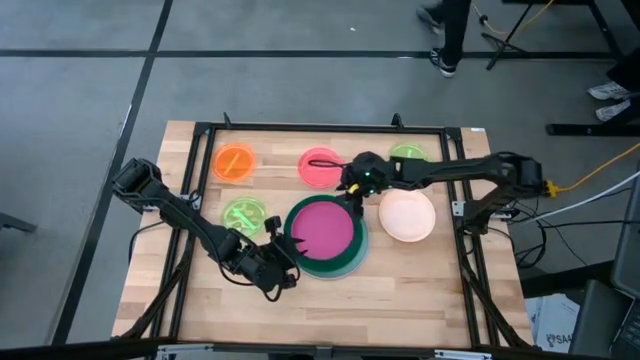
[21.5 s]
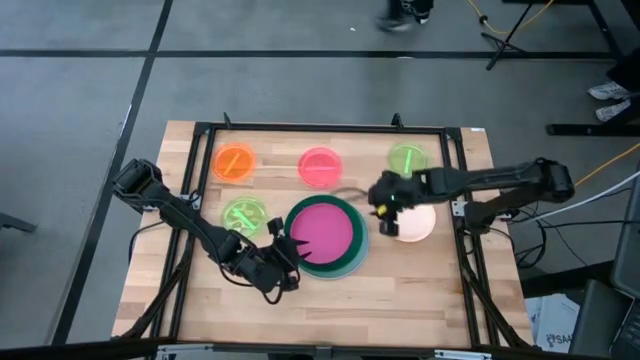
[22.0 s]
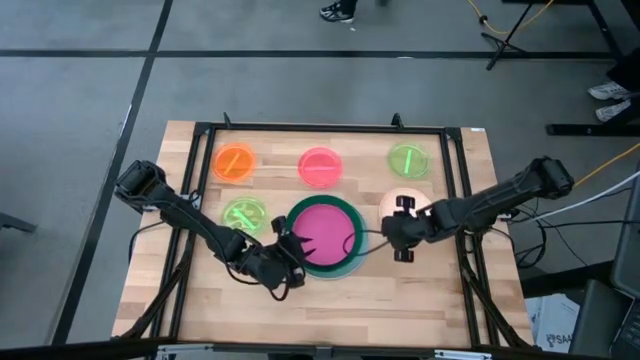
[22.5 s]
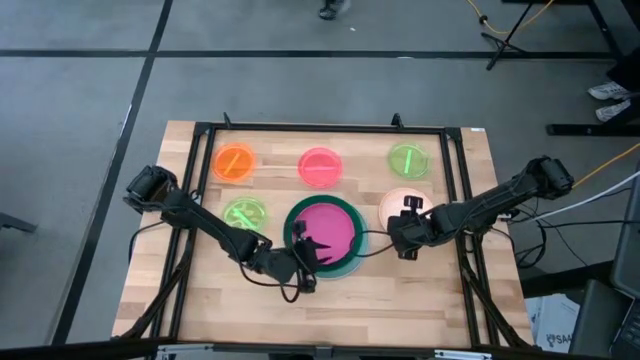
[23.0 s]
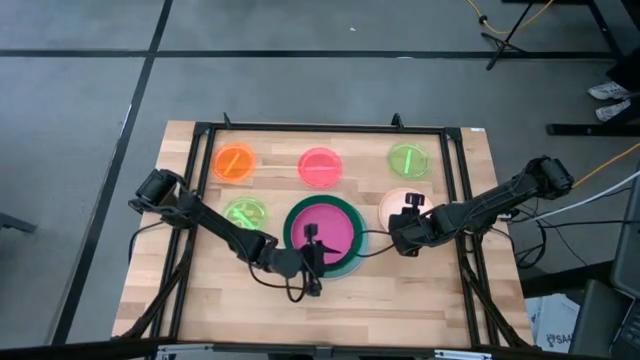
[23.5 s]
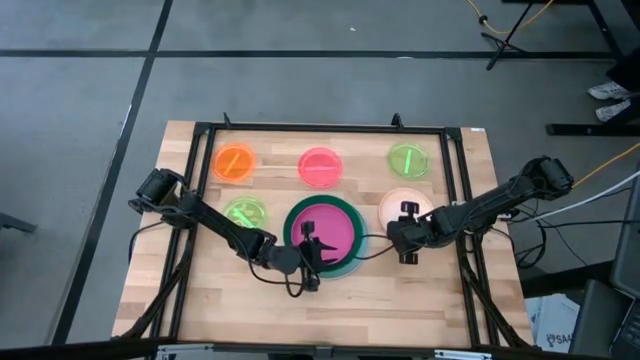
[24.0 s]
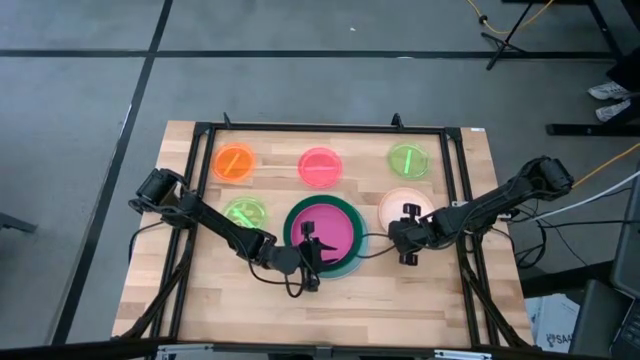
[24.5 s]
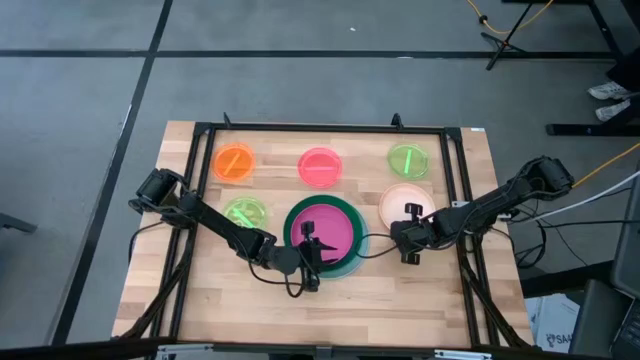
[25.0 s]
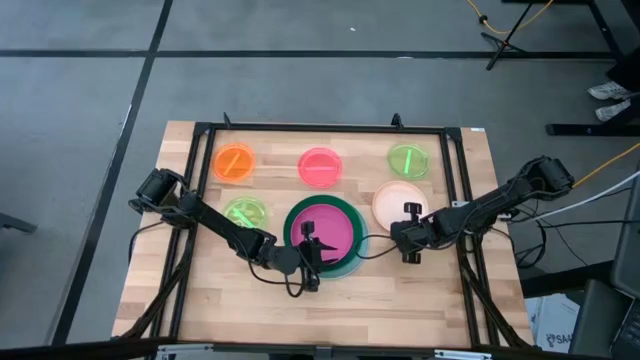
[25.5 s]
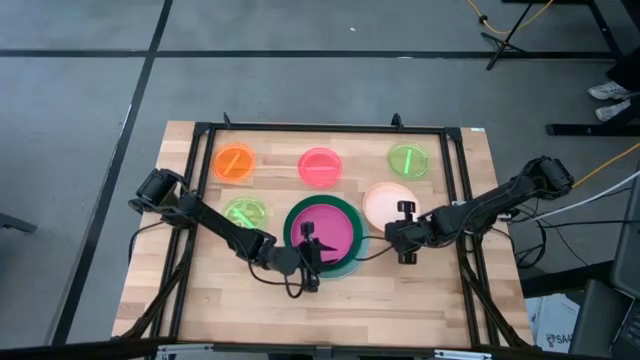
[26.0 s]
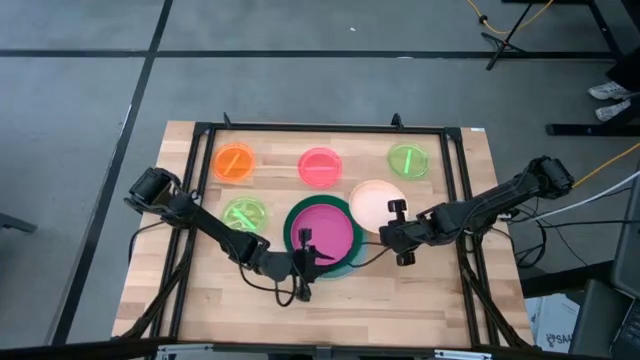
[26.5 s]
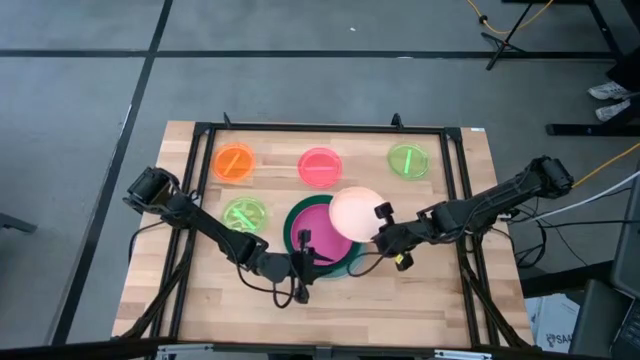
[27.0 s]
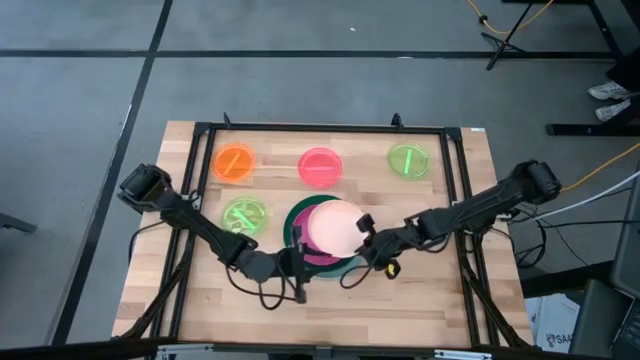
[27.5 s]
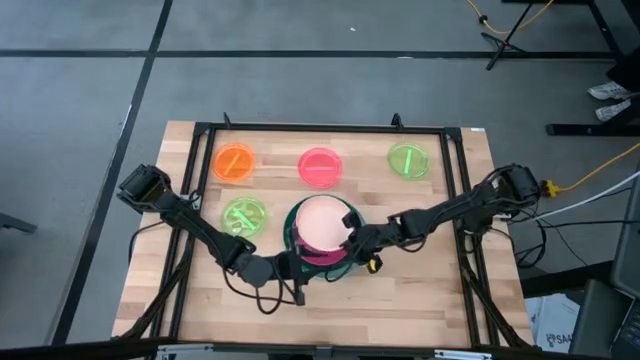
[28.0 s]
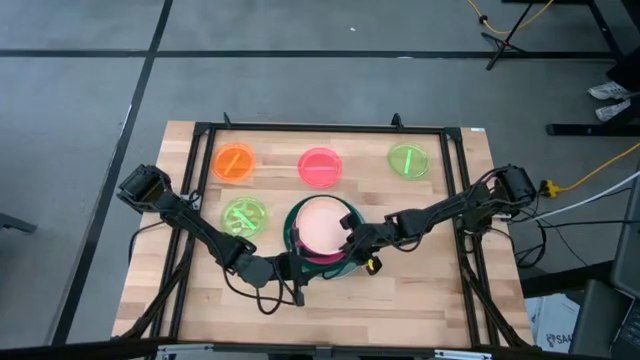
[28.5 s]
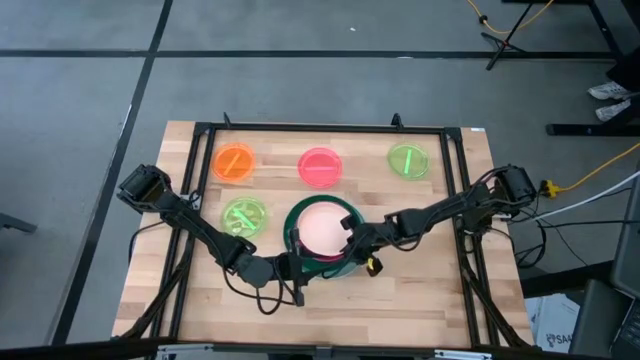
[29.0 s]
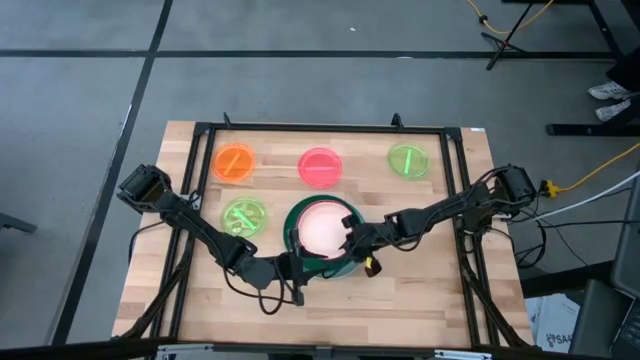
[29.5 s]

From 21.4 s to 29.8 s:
Task: Stack plastic plates
Stack the light orange plate on top of the pink plate

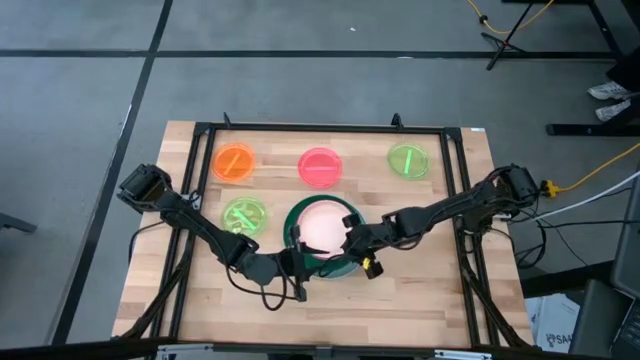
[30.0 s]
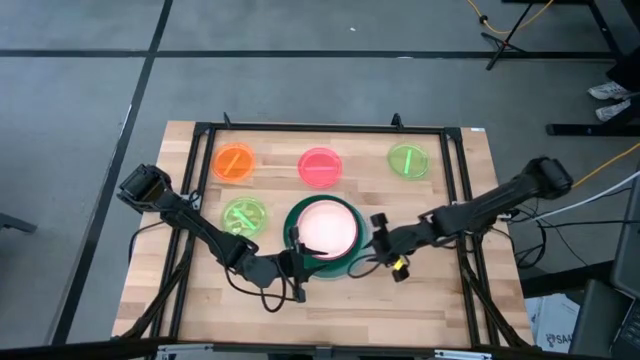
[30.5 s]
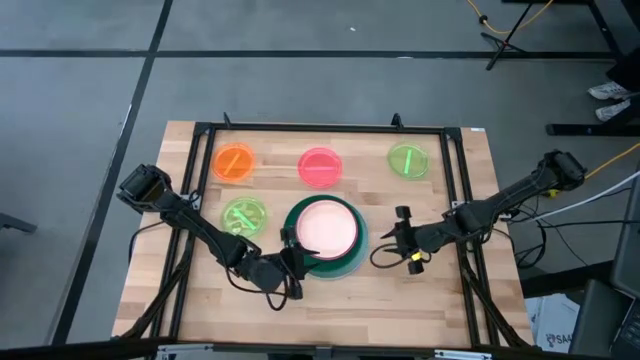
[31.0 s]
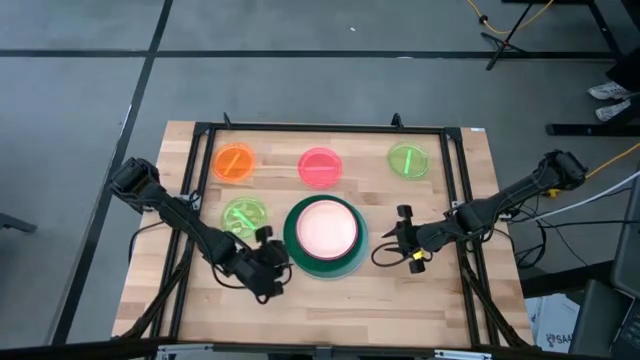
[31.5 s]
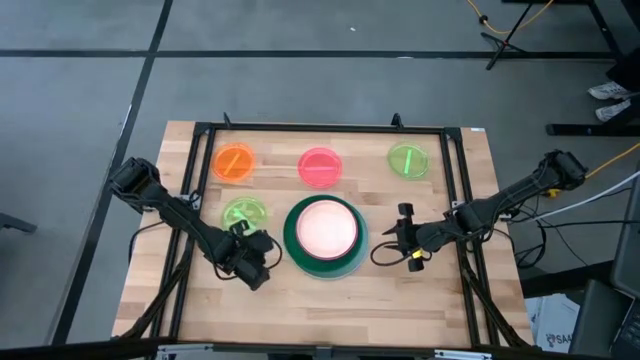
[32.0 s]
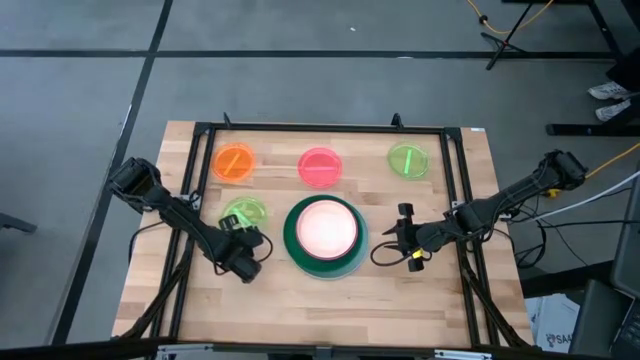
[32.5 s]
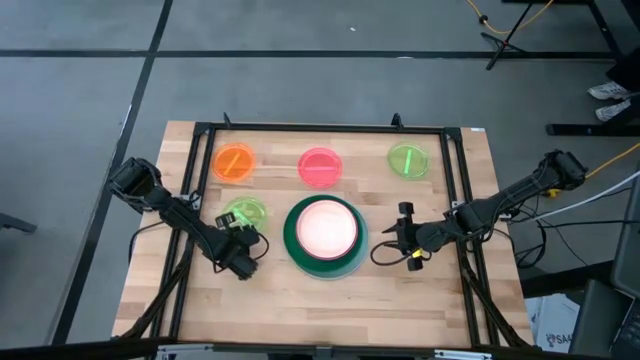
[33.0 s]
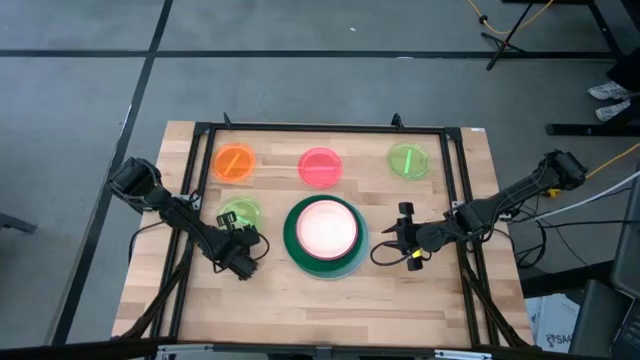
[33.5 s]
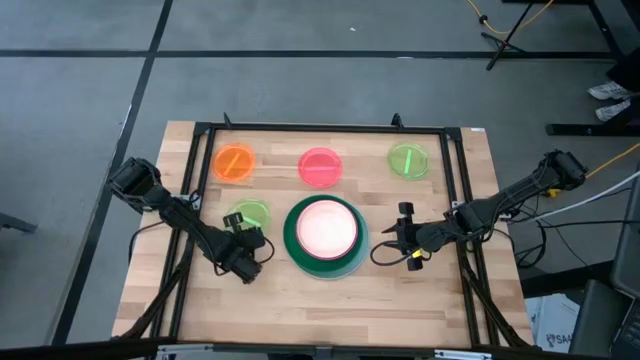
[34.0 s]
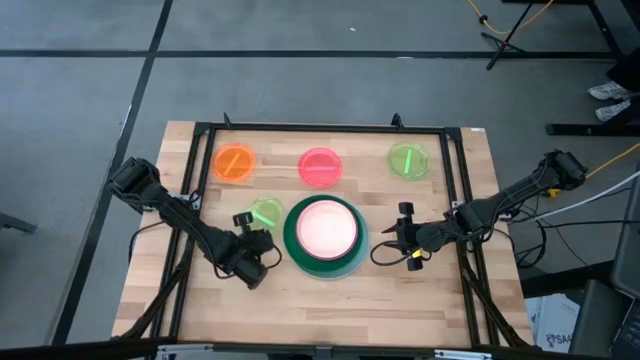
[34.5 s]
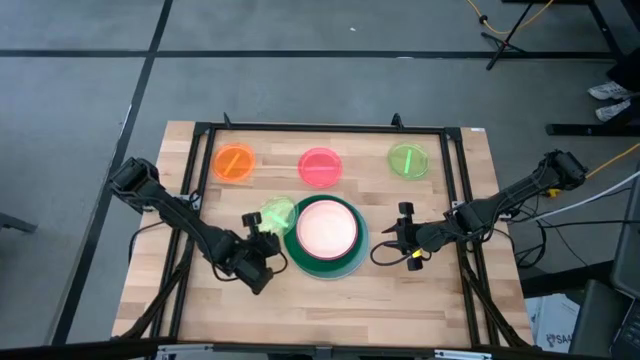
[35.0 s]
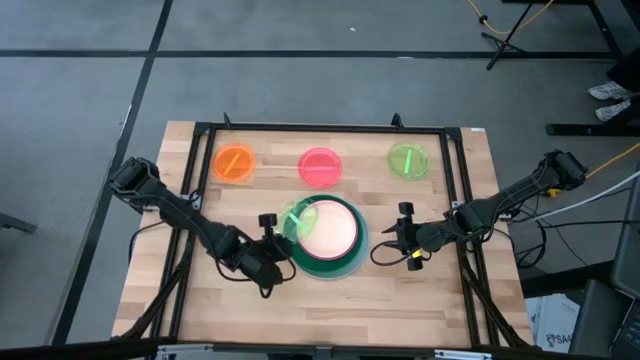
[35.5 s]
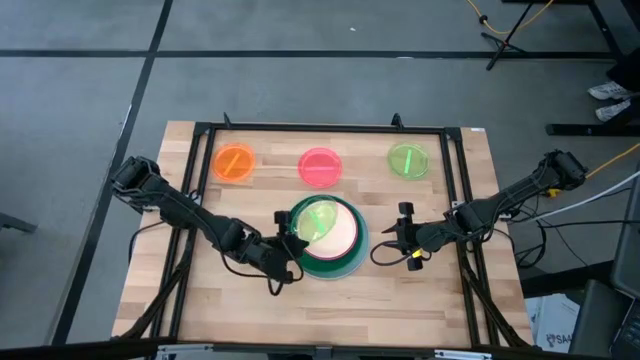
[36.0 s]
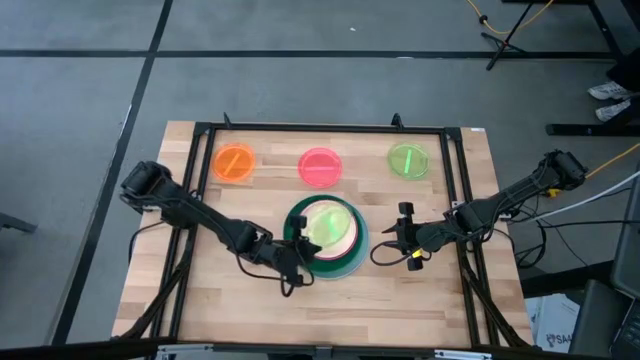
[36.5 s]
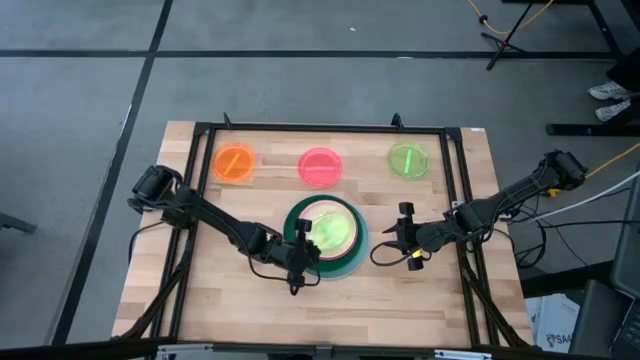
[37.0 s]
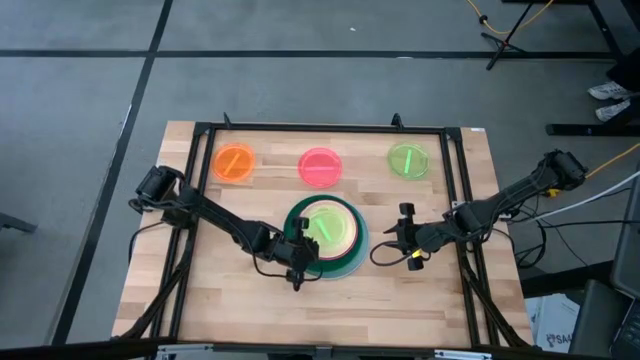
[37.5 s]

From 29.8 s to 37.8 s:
Stack the left transparent green plate on top of the light orange plate

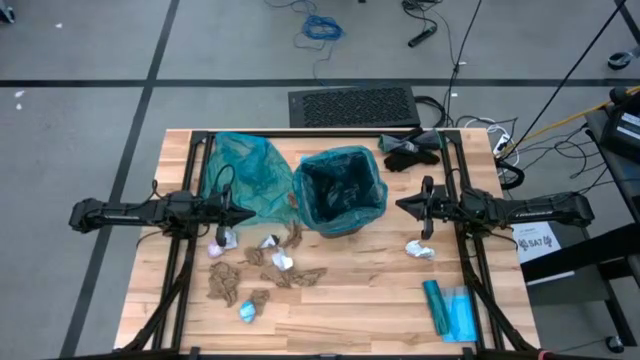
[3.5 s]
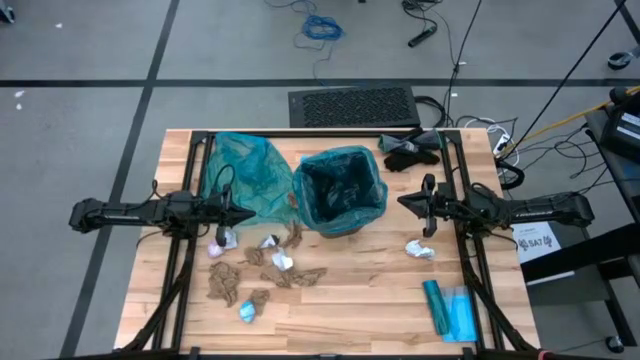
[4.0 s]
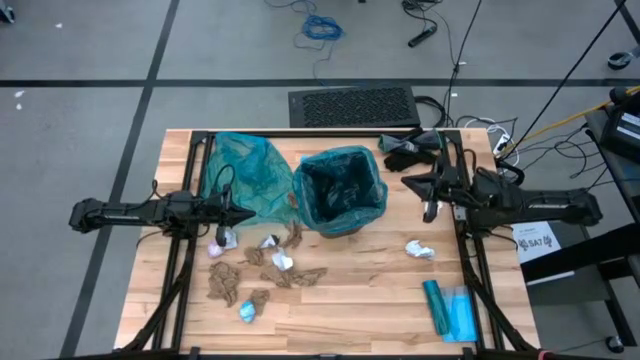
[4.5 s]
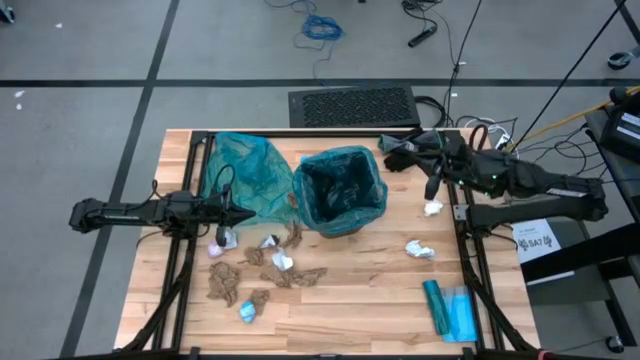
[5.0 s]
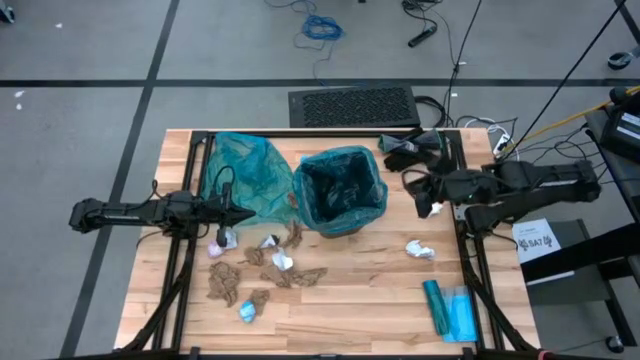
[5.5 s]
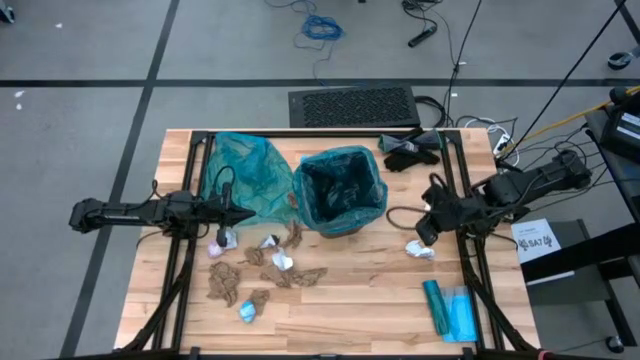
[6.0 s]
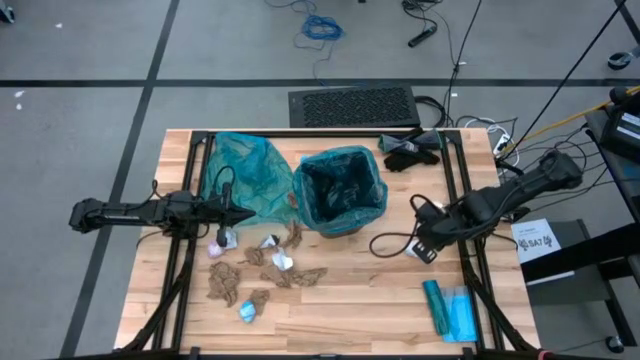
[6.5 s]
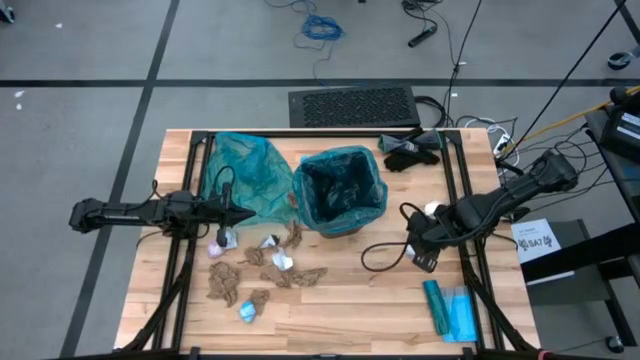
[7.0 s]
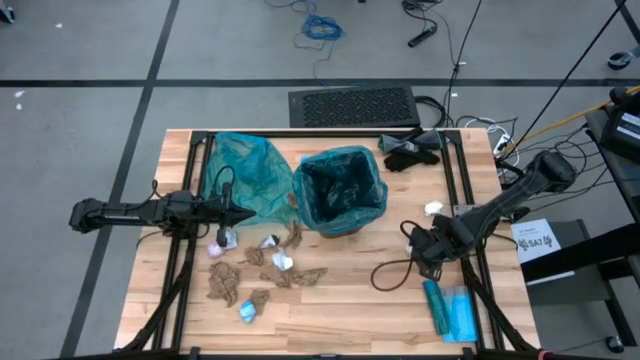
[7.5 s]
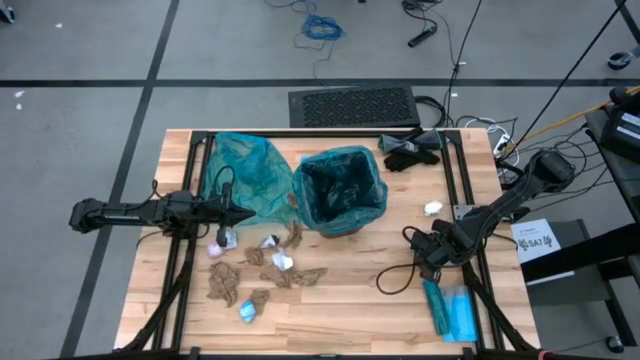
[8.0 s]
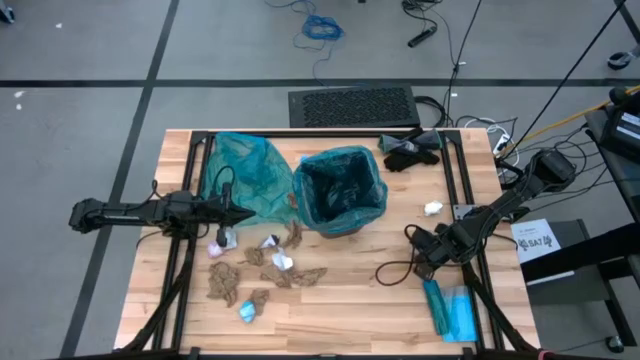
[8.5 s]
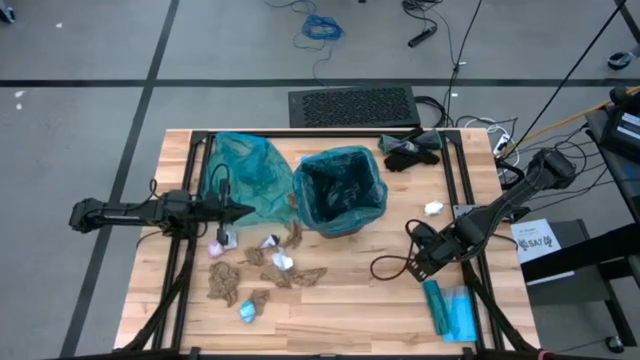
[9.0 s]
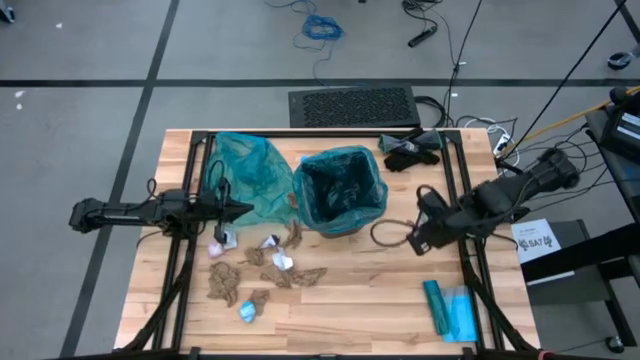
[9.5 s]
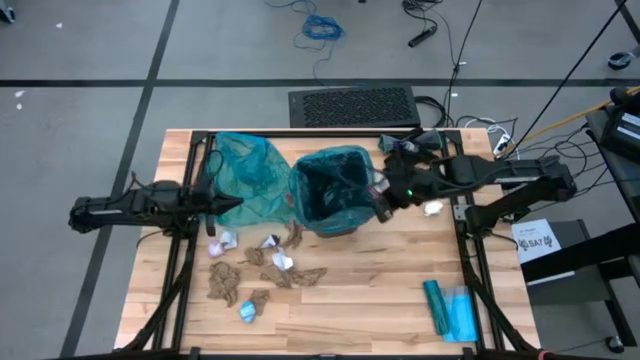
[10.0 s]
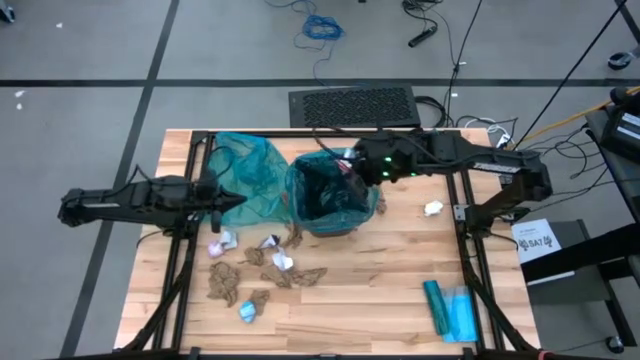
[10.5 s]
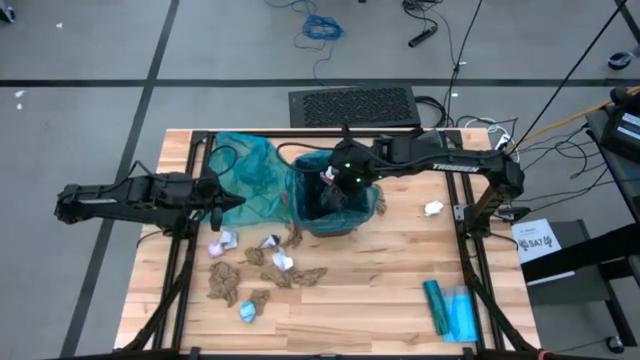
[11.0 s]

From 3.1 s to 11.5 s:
Task: place trash/remove bag and relplace
Put the white paper into the trash bin
